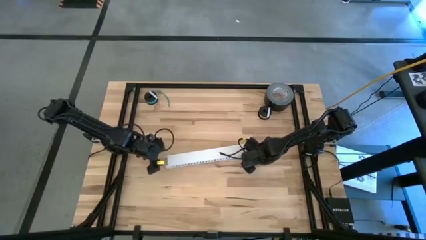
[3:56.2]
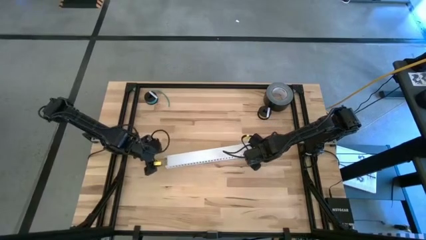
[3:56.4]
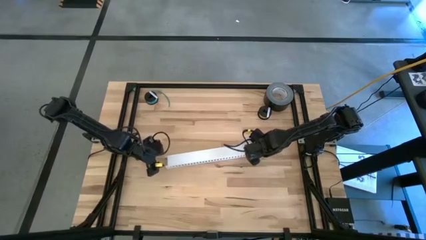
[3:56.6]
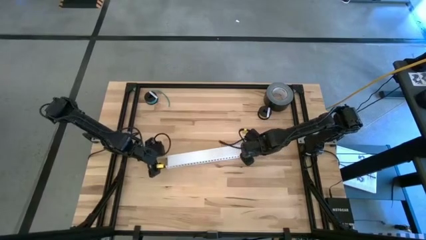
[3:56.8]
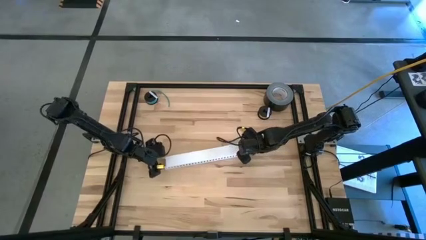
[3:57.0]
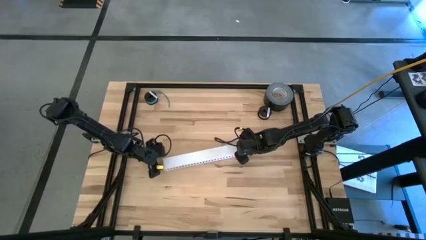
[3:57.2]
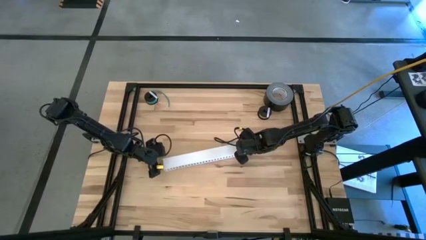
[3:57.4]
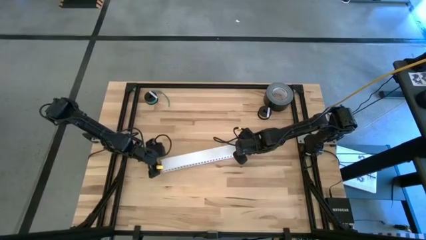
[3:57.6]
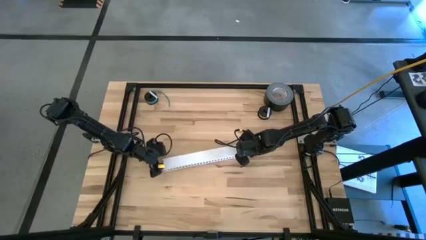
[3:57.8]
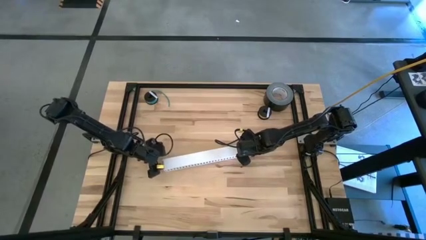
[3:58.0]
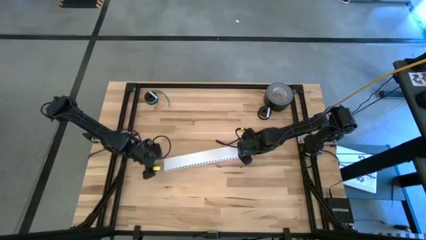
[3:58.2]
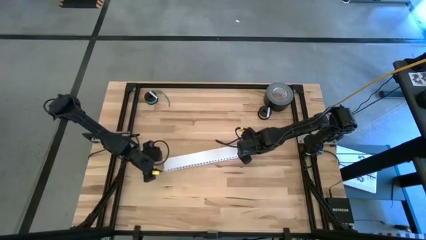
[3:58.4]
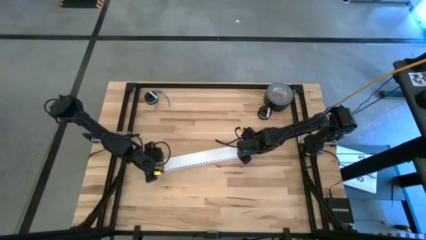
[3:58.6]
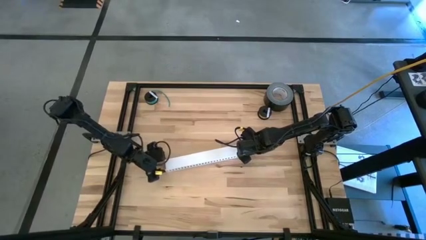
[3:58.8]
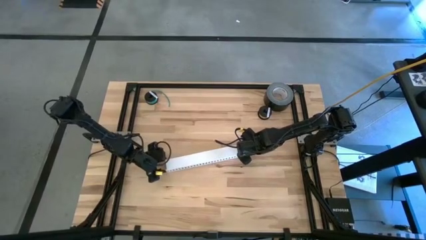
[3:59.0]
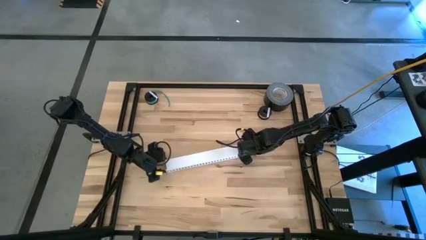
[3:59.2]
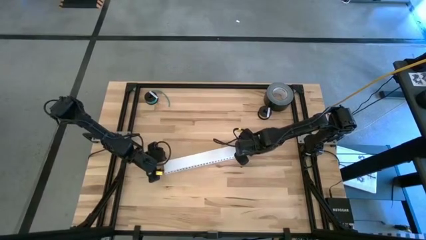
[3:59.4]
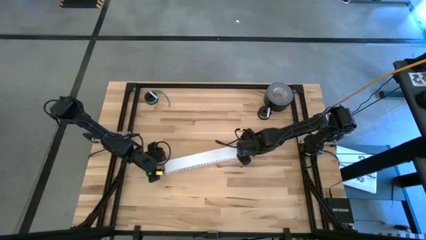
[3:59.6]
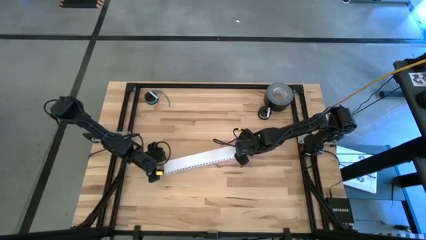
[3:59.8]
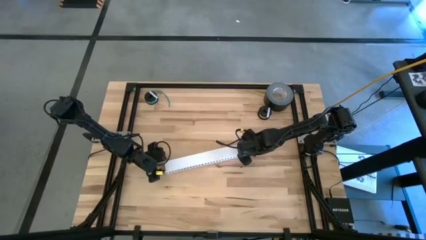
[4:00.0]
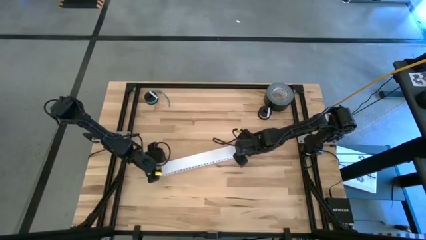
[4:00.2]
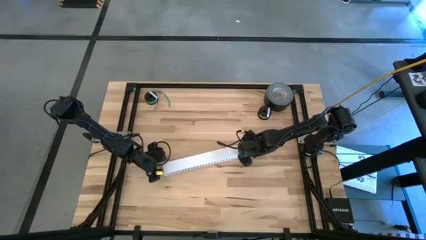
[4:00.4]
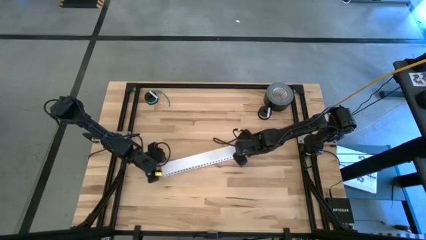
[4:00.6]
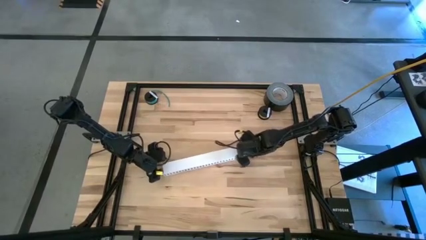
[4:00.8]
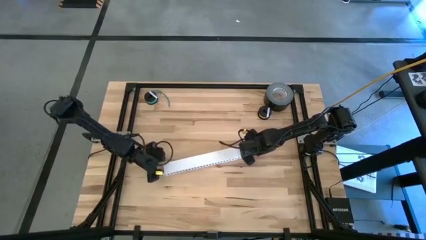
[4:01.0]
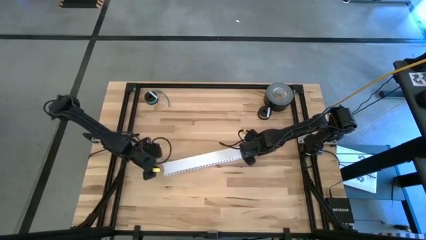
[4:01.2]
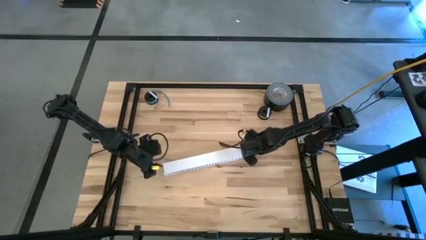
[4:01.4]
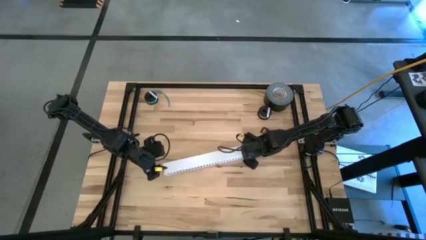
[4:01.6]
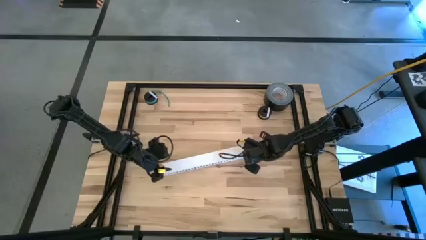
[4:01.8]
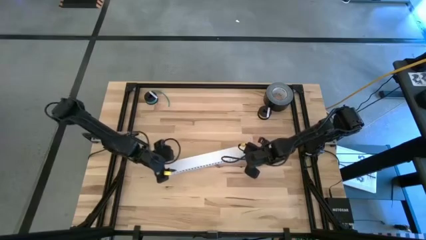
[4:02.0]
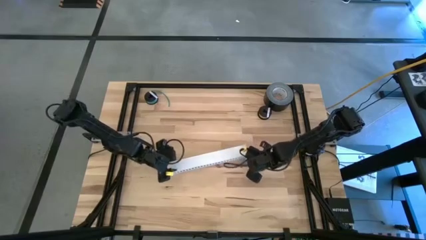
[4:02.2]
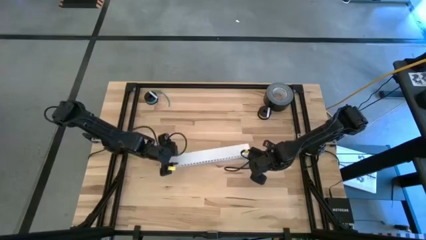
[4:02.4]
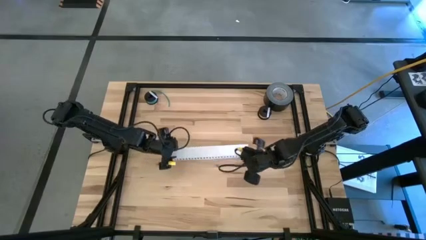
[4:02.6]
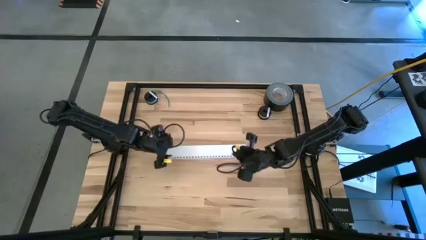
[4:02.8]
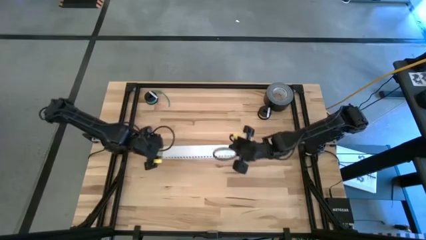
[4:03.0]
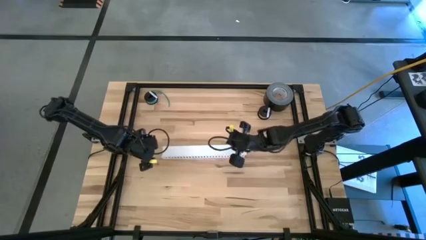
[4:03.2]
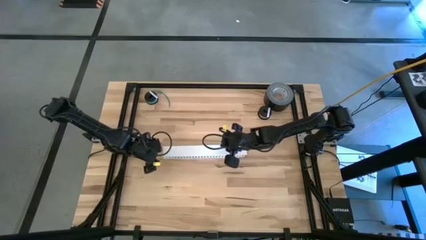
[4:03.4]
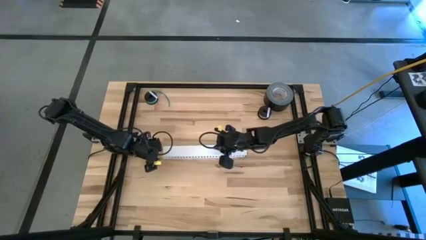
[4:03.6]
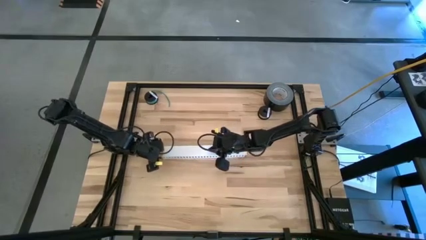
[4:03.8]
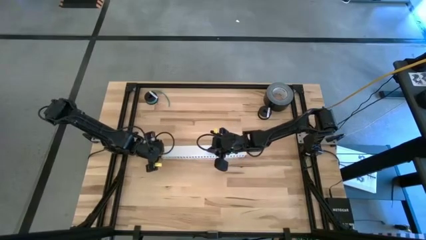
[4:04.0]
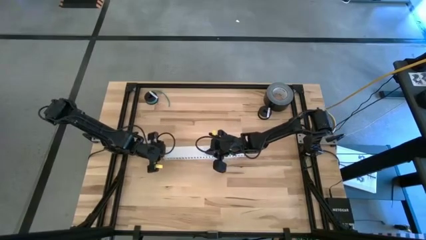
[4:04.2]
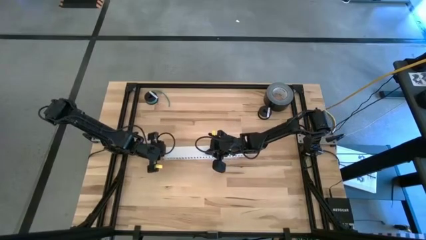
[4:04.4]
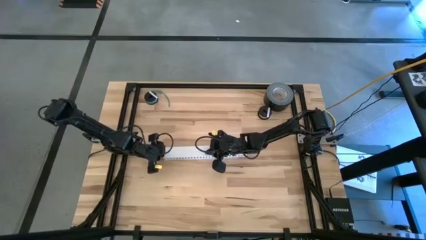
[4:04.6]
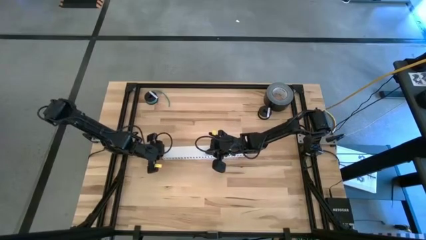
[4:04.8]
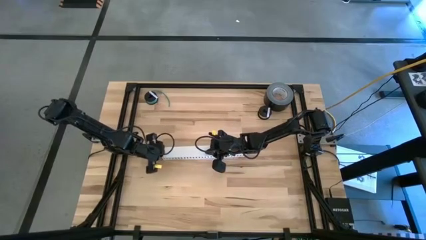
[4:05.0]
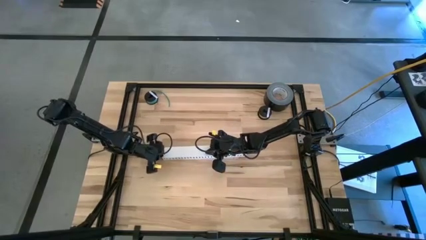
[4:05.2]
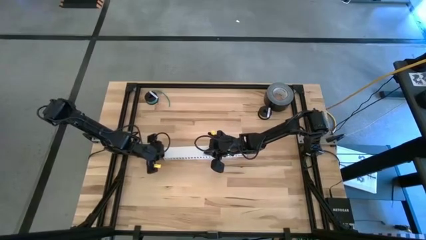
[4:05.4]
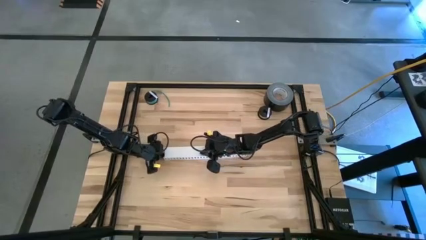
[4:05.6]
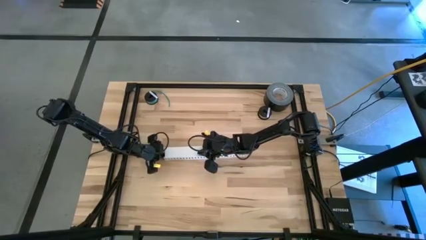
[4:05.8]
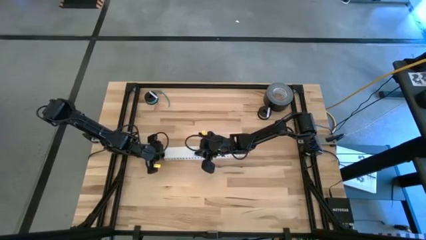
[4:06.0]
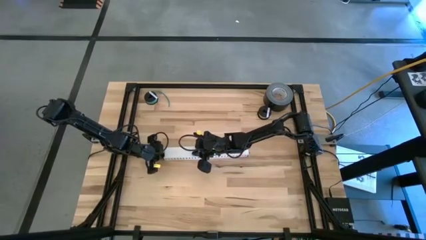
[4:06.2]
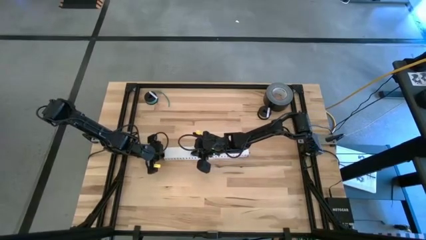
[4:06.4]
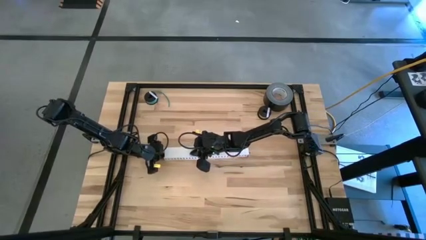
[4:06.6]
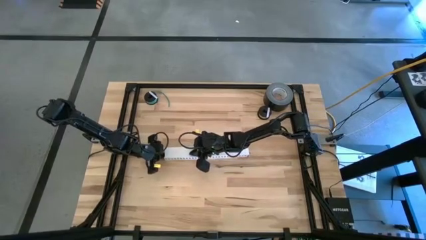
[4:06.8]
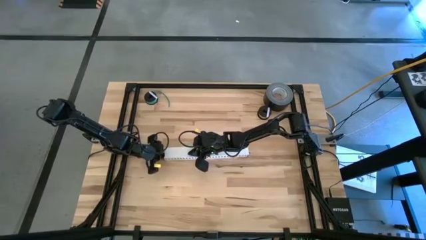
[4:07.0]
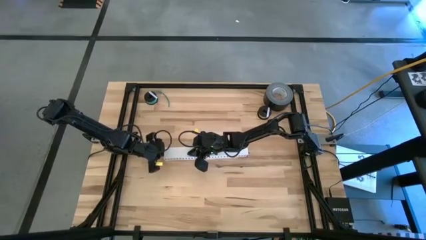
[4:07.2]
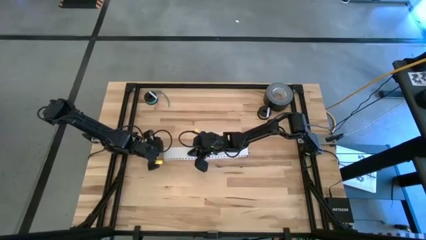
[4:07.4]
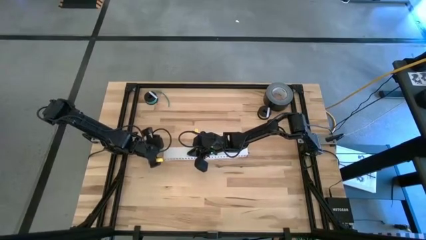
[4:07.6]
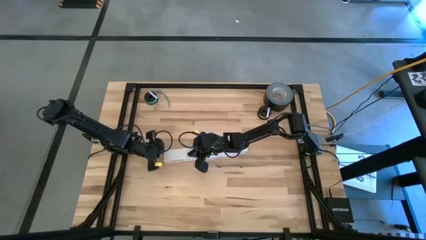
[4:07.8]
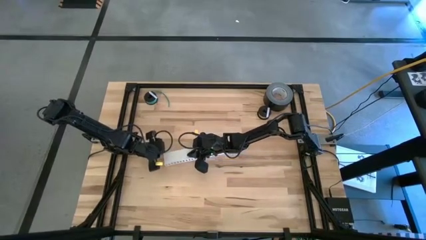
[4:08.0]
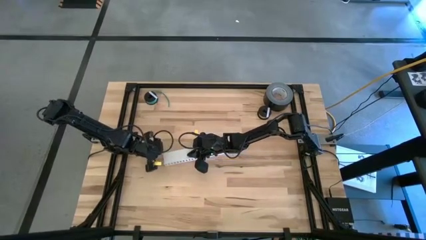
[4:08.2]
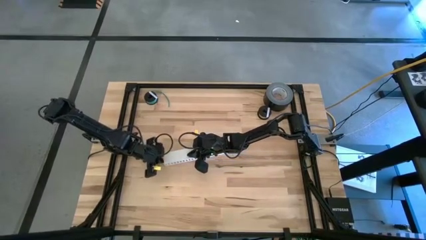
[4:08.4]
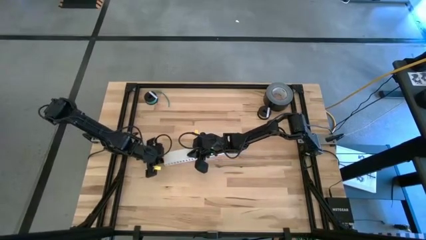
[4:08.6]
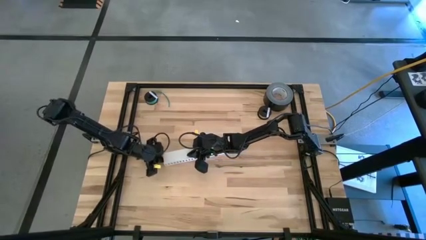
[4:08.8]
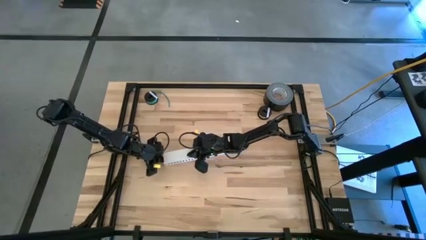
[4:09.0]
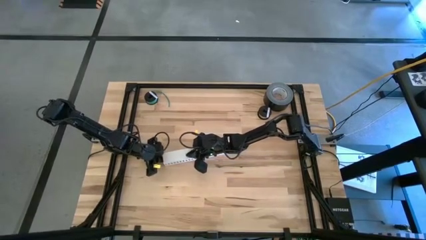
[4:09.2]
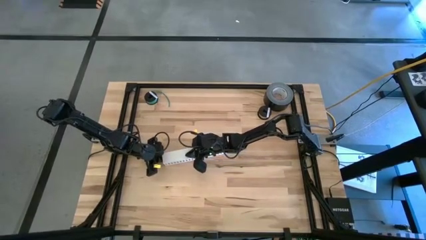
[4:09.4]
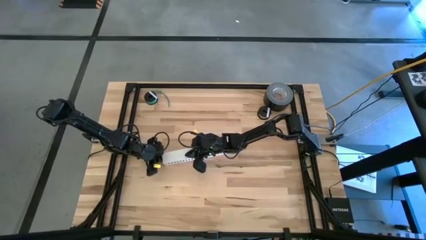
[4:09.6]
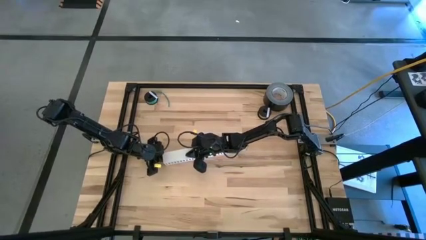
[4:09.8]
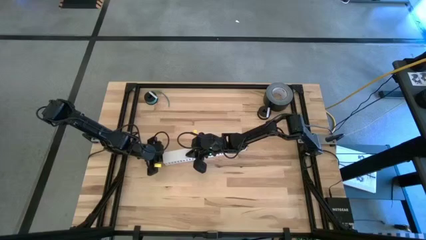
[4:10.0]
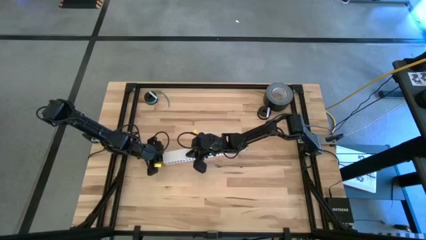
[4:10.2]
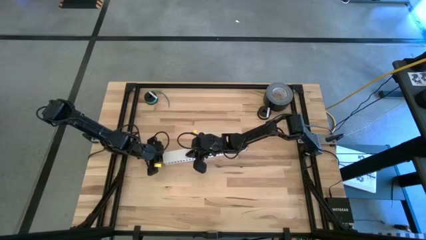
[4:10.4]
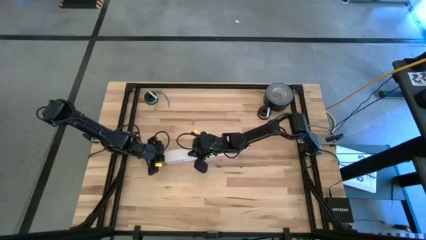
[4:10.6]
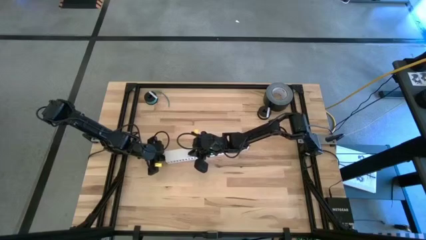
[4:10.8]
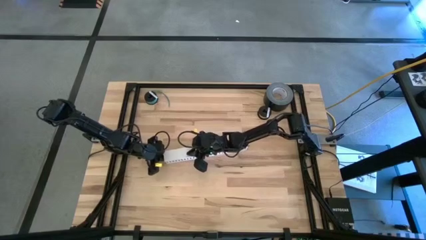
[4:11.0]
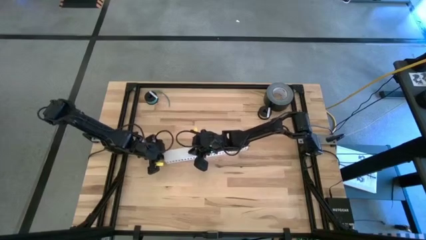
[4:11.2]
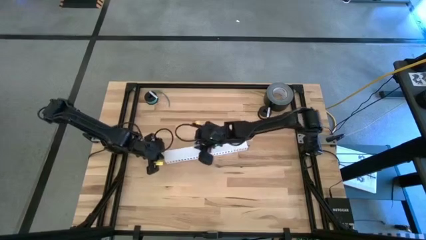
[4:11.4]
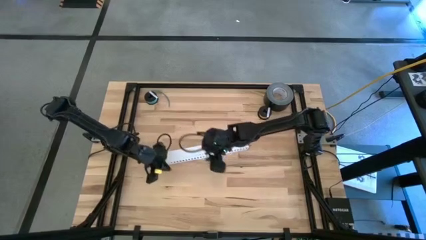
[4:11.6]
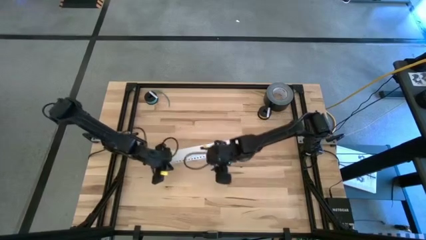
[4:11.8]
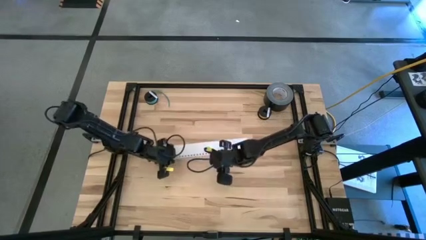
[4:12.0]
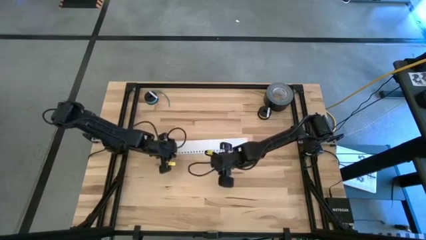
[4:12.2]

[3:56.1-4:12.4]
Task: Ziptie cables
Close the white cable duct
